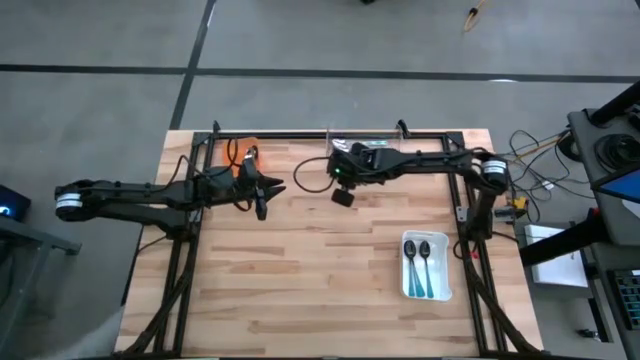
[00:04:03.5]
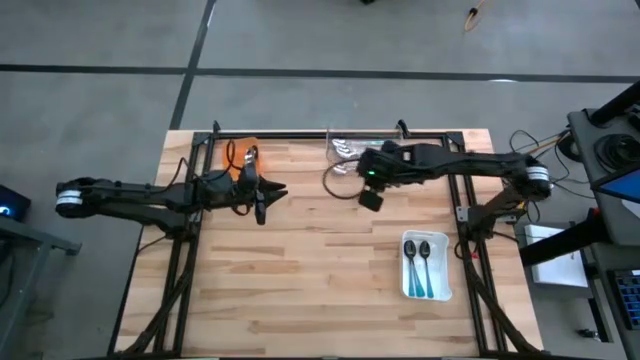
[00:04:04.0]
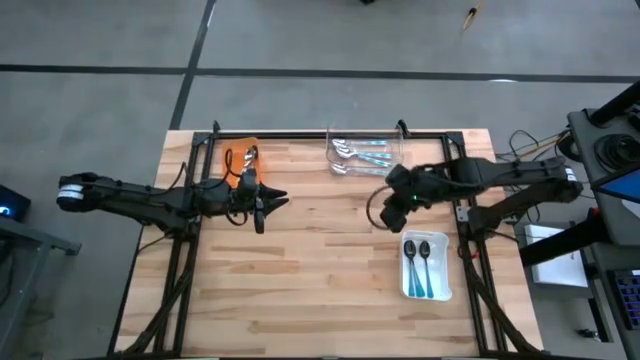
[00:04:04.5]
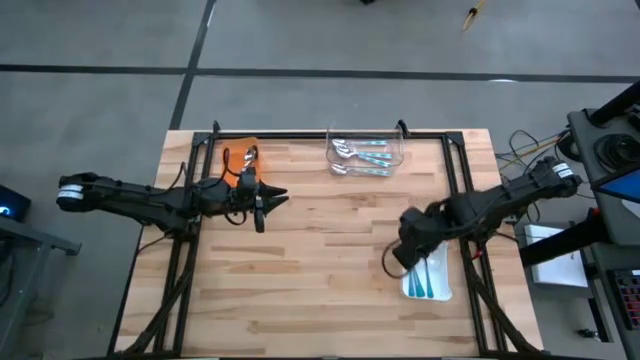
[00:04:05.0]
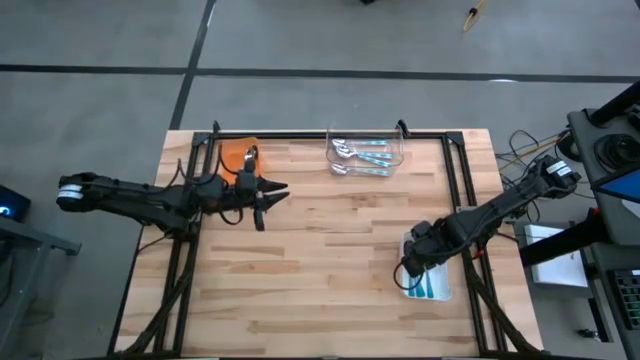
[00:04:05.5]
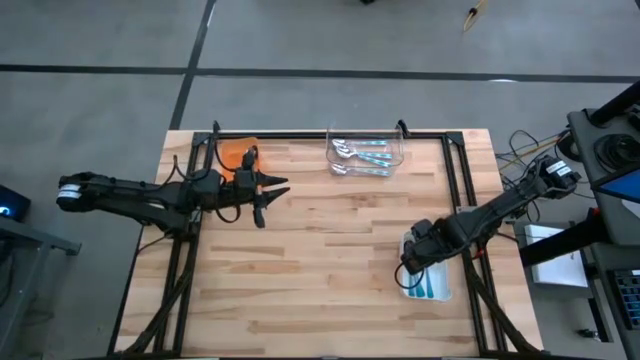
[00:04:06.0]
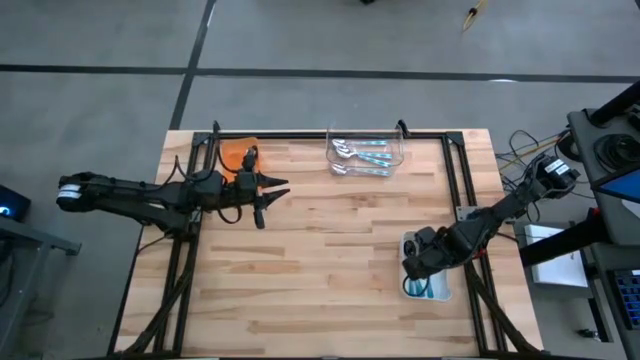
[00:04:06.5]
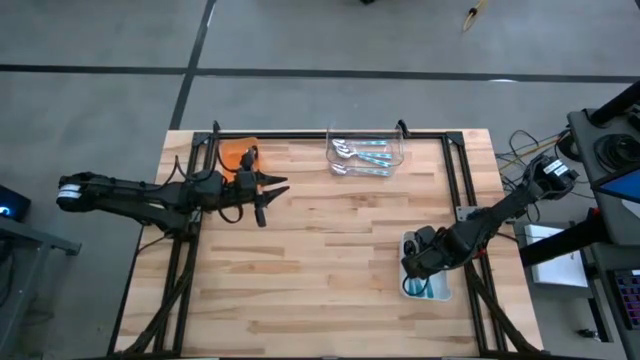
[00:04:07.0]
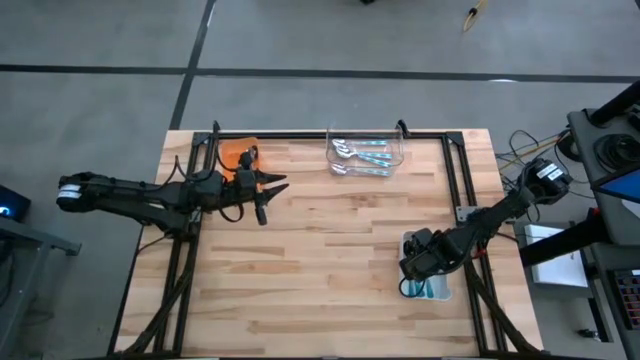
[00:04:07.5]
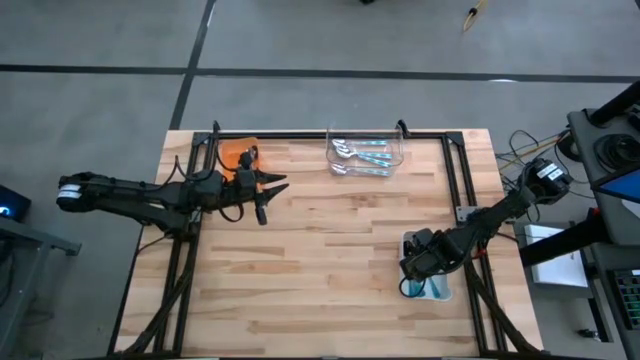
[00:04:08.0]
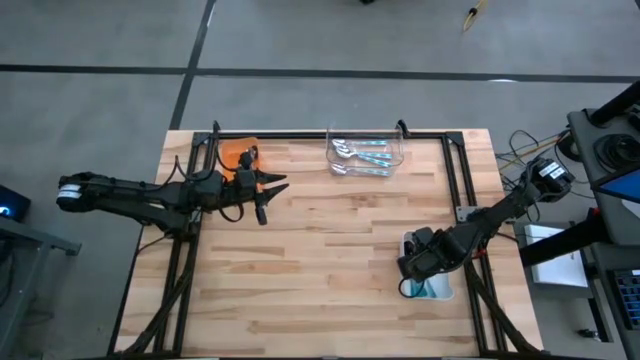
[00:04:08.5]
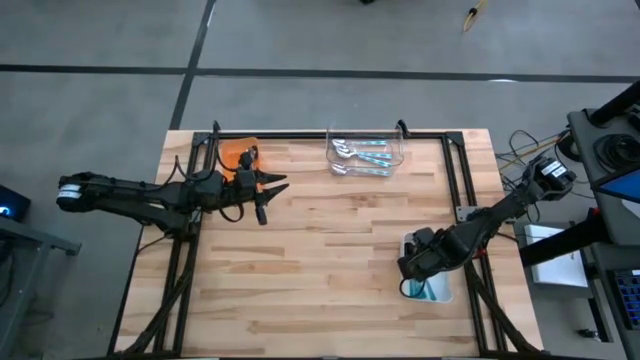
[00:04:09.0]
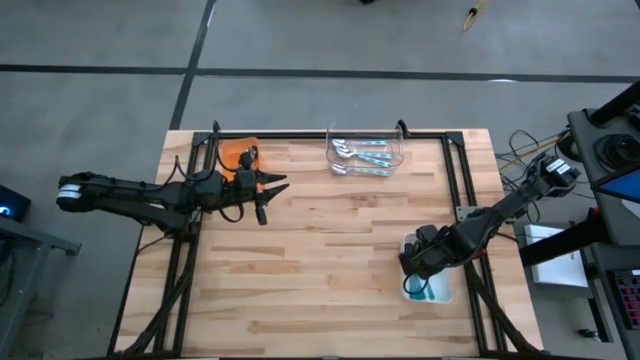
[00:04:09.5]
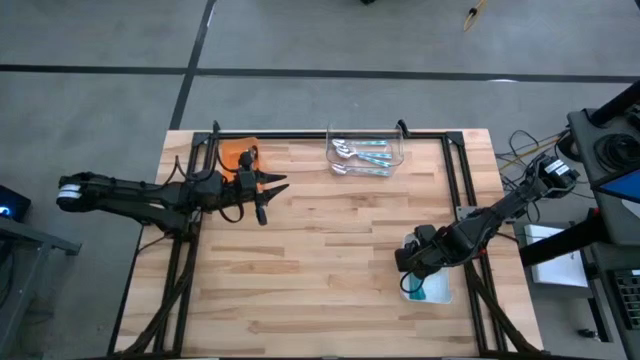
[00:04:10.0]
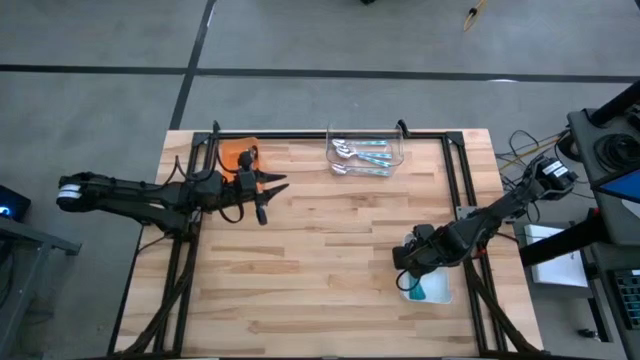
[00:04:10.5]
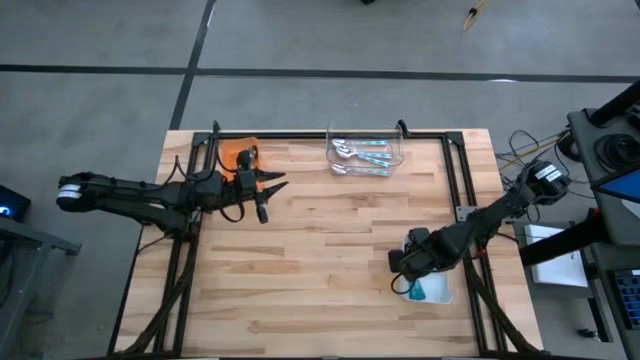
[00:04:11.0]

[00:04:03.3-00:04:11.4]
Task: Sort silverware by color (type)
Adjust the blue spoon on the white bin

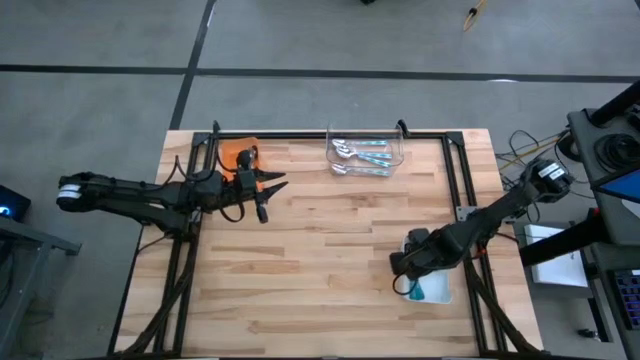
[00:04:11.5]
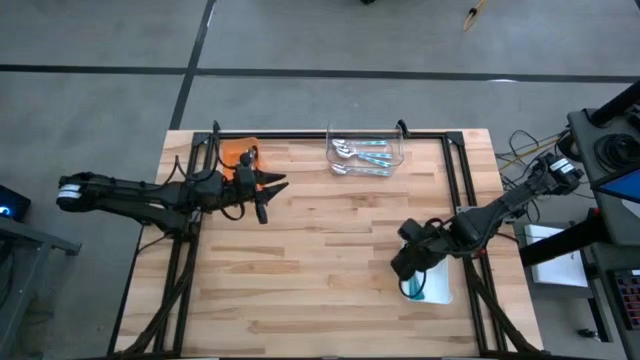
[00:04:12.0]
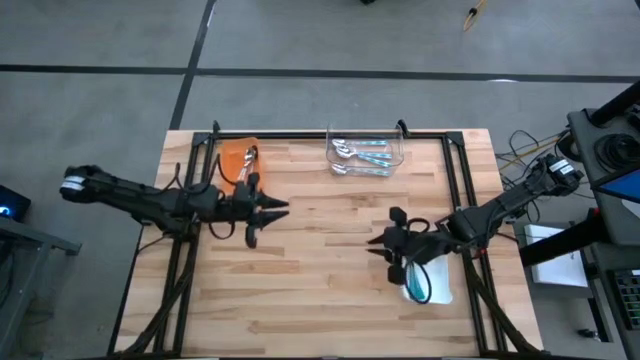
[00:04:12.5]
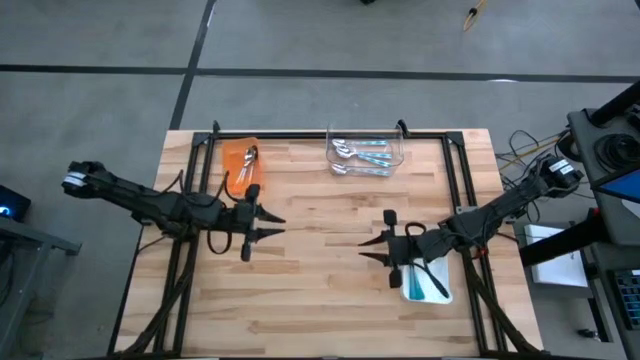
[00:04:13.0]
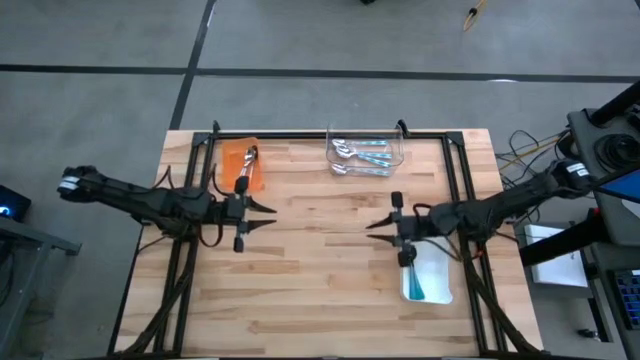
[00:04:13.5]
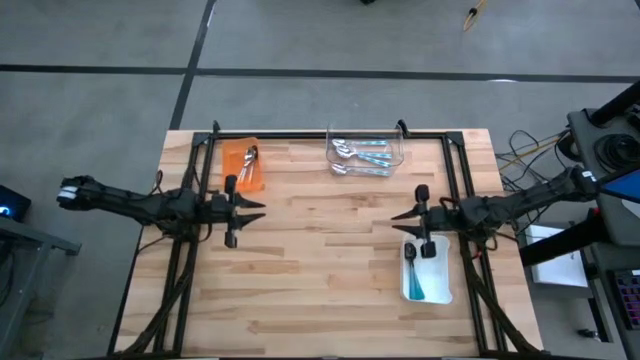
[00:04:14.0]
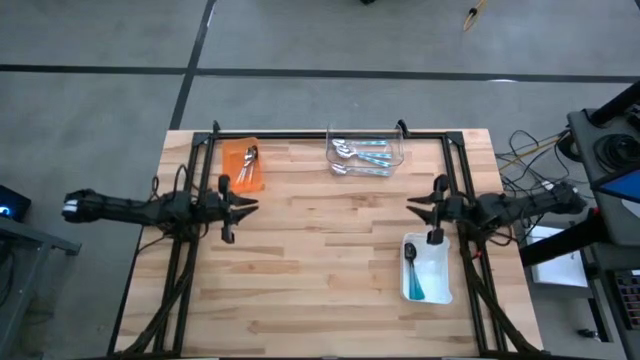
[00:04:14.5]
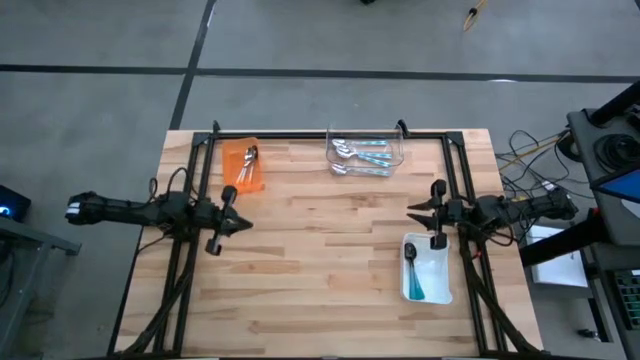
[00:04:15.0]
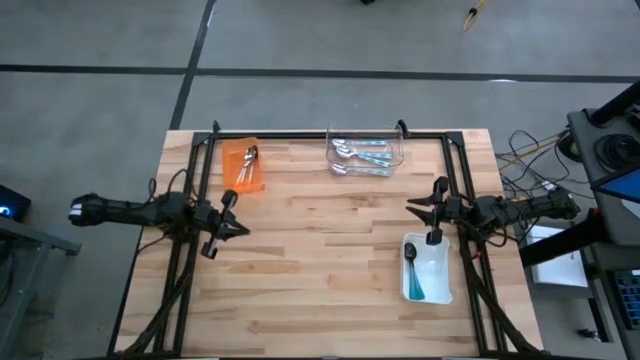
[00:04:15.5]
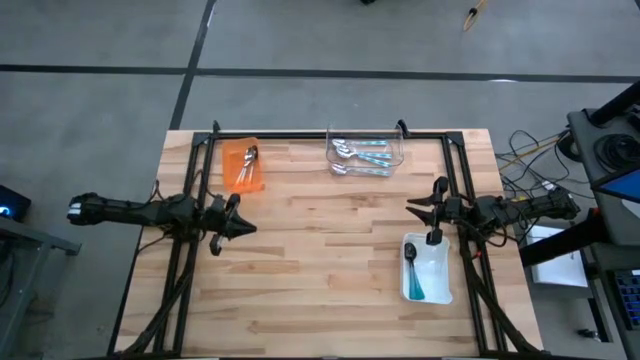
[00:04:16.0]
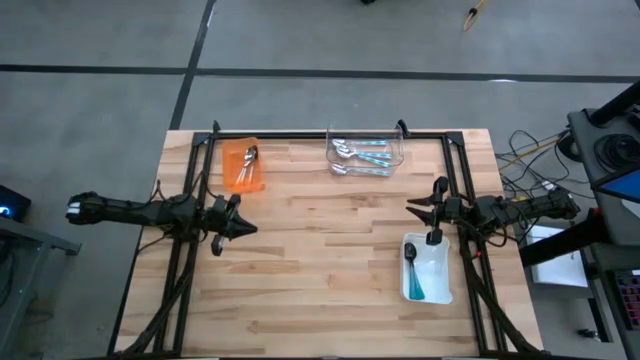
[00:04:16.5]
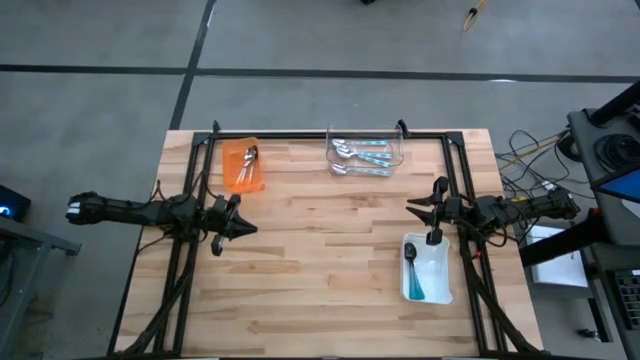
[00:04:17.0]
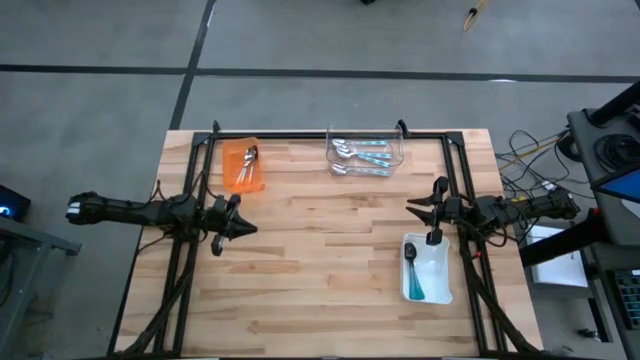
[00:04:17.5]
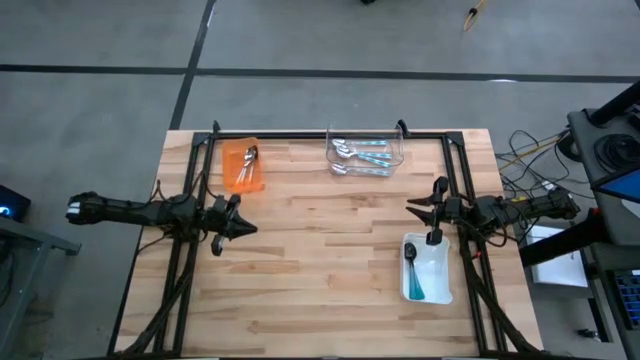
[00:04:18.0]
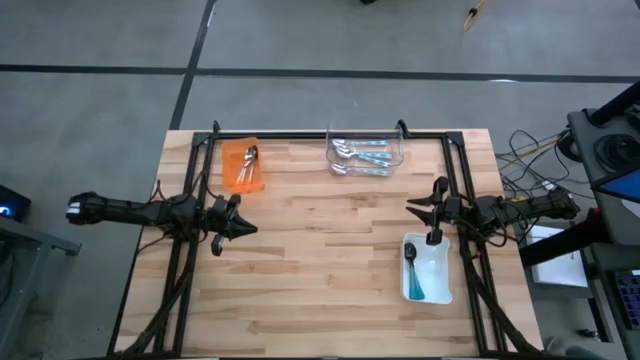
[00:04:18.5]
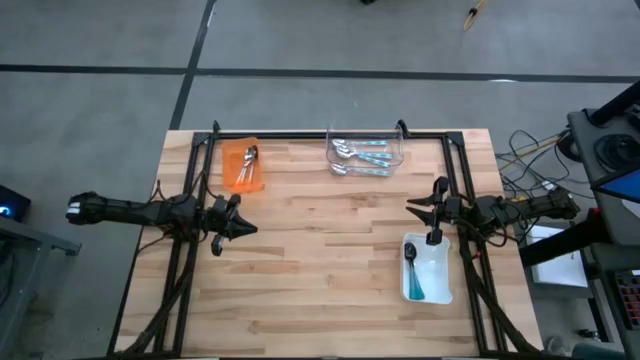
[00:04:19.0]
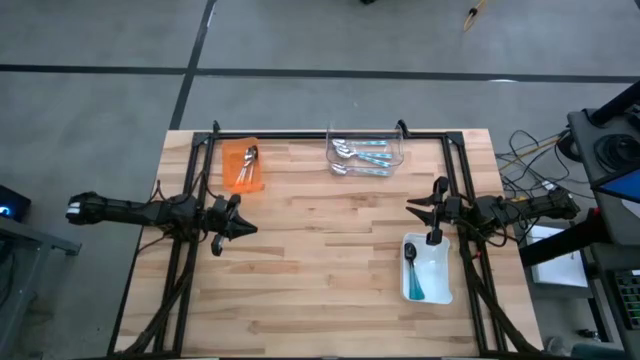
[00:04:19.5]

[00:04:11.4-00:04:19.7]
Return to Home Position

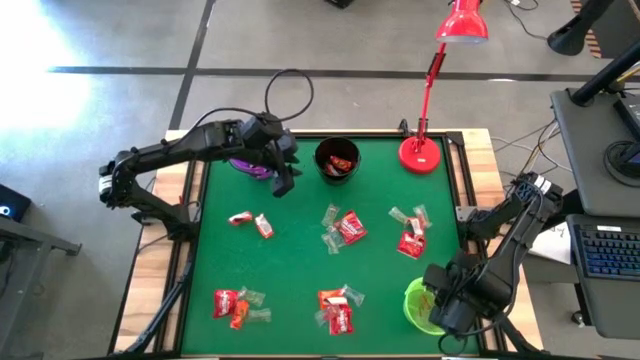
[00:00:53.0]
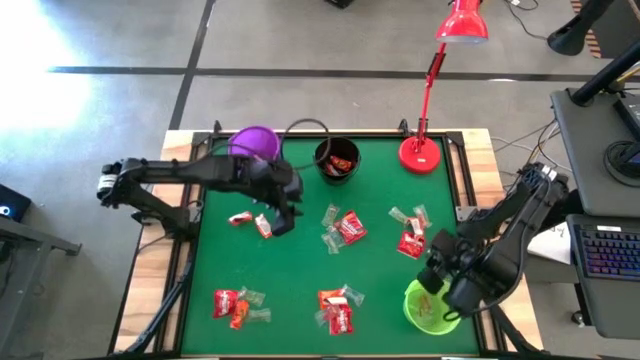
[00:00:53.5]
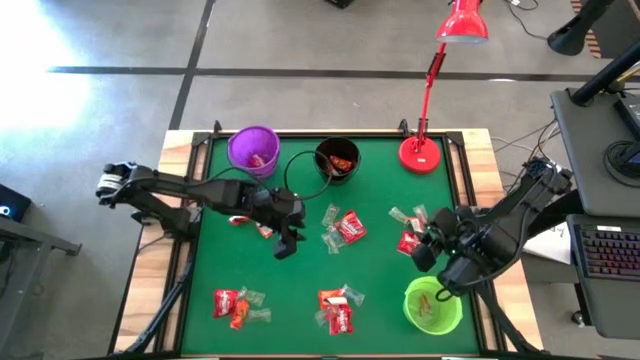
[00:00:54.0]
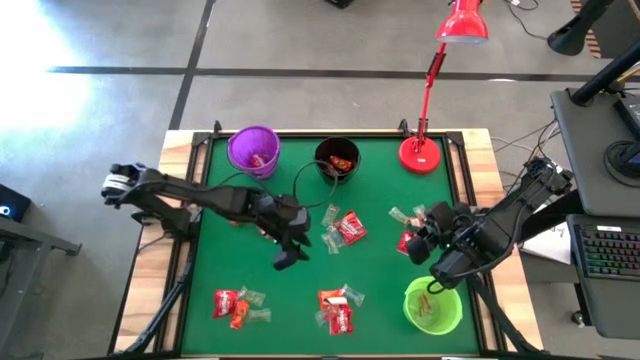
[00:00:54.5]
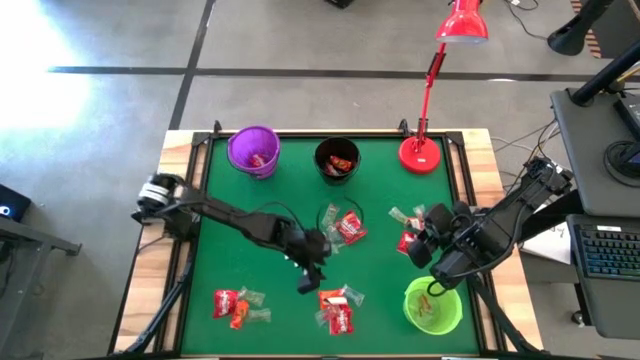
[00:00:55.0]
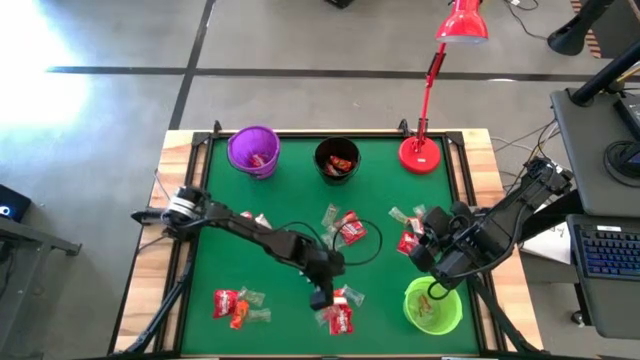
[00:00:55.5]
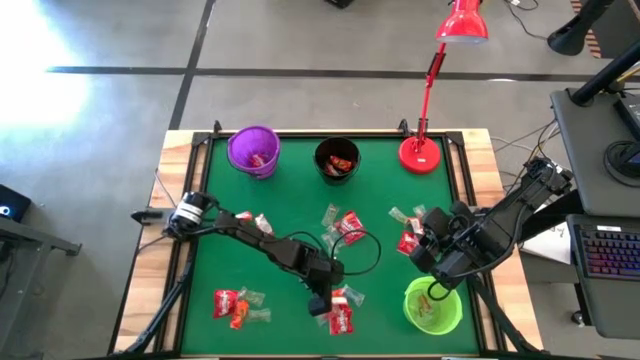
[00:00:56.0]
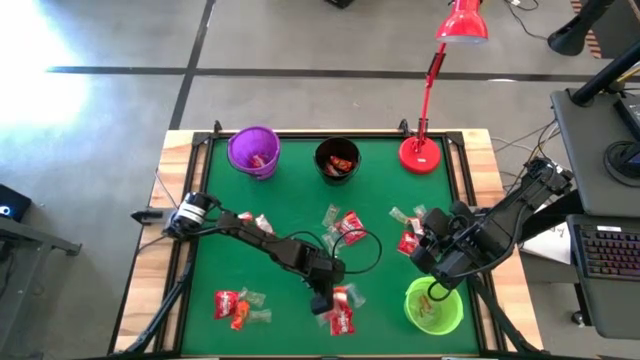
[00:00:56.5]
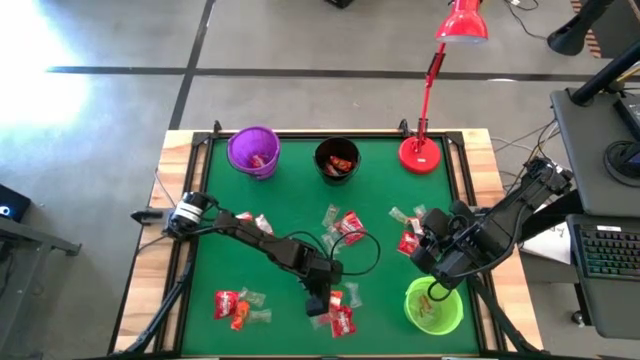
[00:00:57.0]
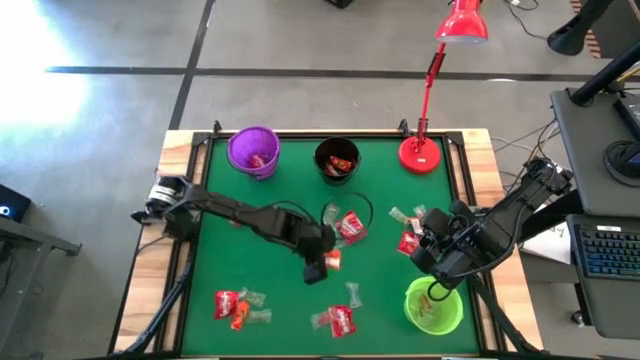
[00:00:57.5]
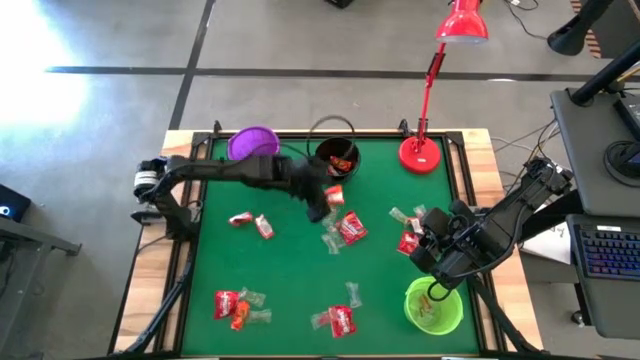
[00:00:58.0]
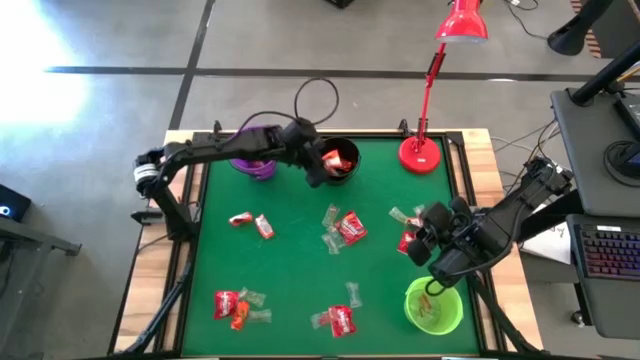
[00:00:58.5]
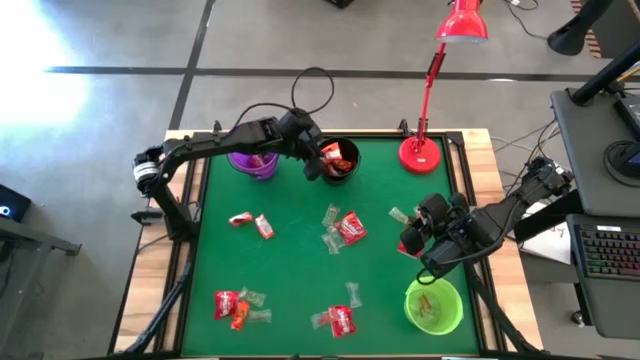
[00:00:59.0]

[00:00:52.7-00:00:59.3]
Task: Sort candy
Put the orange candy into the black bucket
